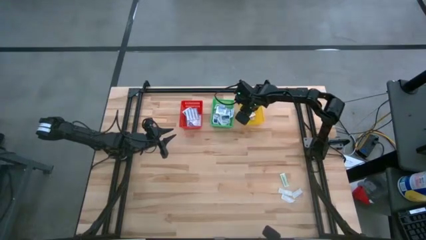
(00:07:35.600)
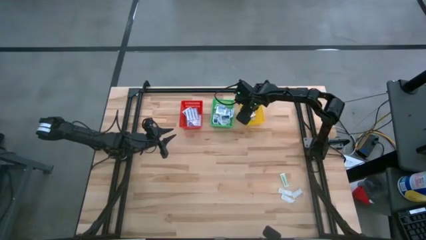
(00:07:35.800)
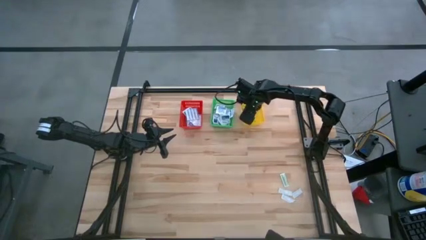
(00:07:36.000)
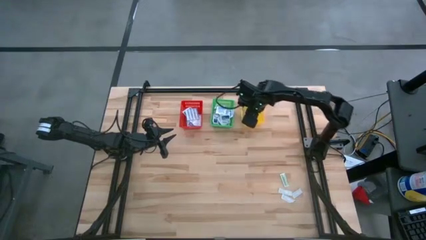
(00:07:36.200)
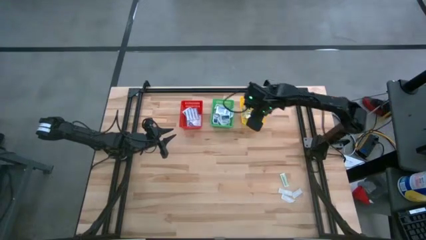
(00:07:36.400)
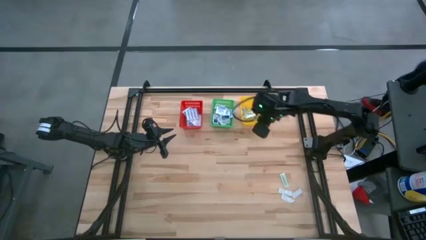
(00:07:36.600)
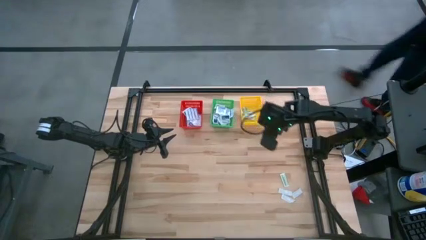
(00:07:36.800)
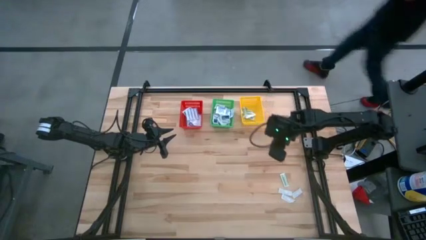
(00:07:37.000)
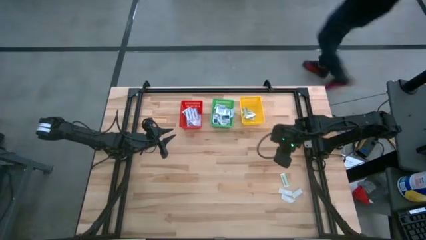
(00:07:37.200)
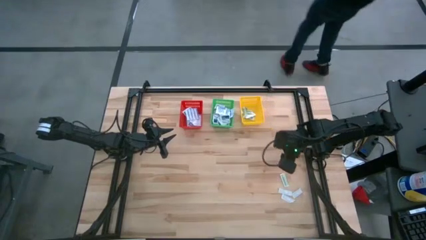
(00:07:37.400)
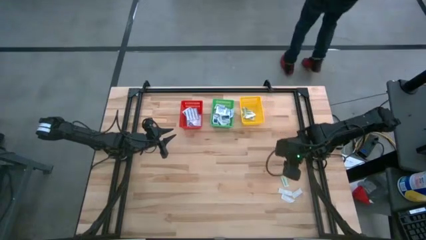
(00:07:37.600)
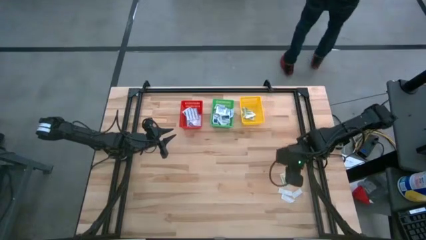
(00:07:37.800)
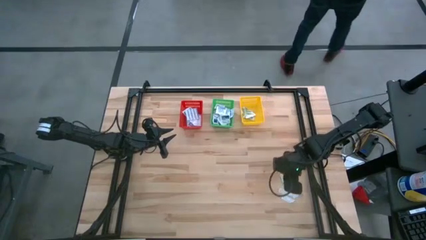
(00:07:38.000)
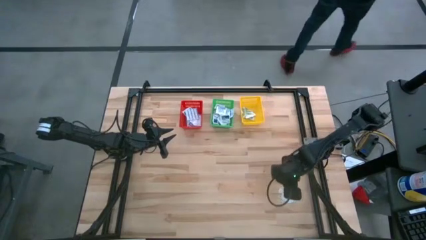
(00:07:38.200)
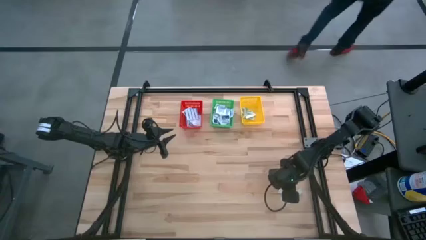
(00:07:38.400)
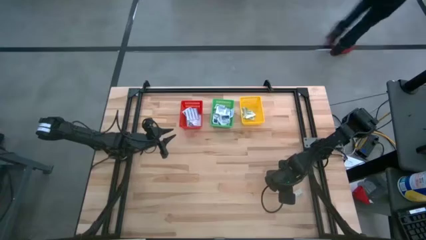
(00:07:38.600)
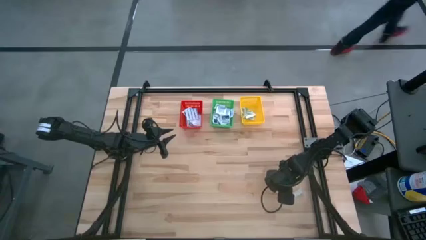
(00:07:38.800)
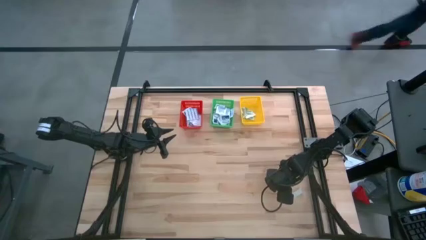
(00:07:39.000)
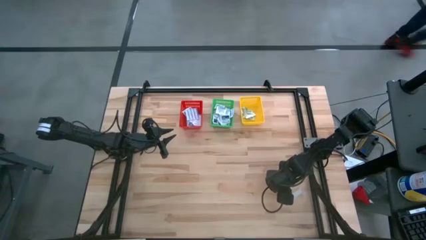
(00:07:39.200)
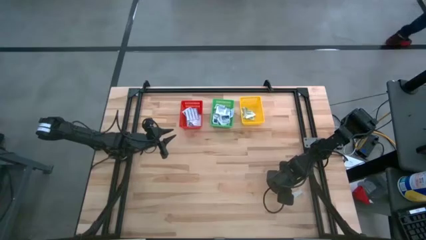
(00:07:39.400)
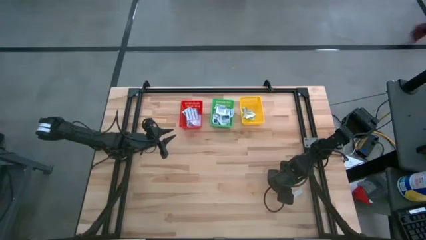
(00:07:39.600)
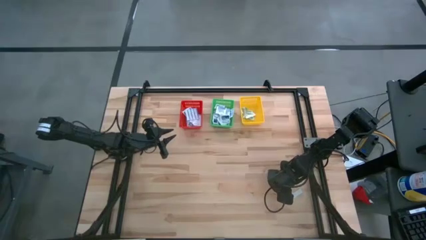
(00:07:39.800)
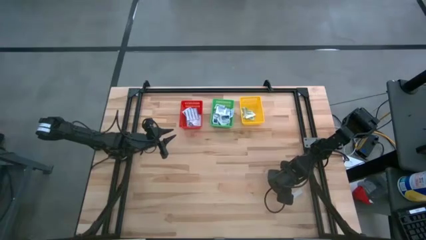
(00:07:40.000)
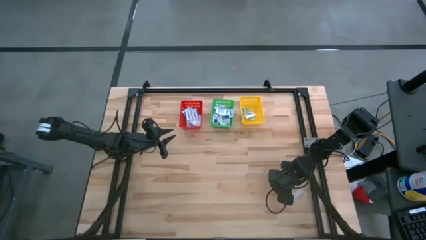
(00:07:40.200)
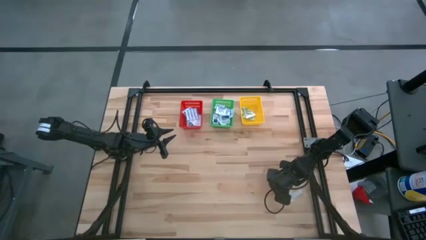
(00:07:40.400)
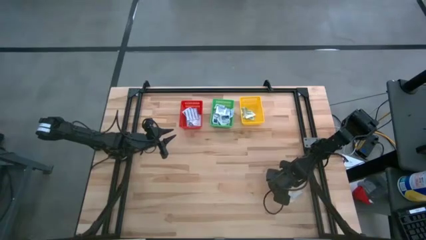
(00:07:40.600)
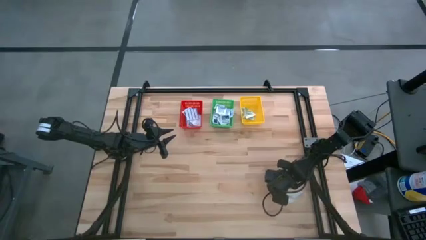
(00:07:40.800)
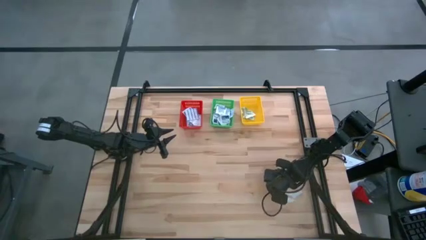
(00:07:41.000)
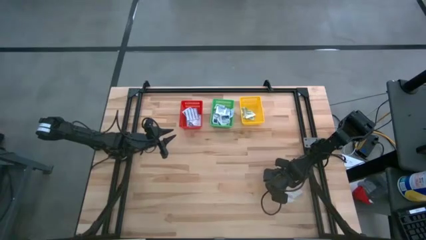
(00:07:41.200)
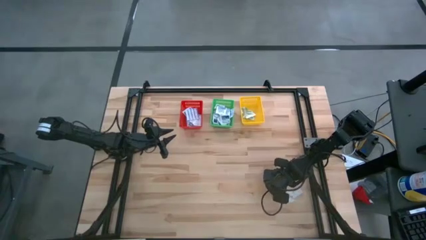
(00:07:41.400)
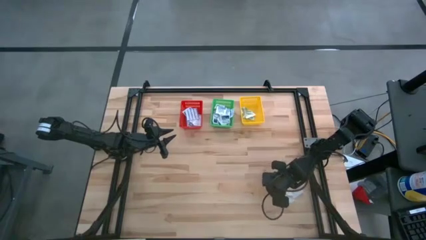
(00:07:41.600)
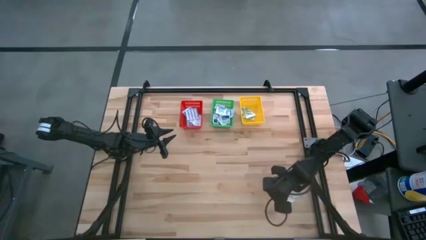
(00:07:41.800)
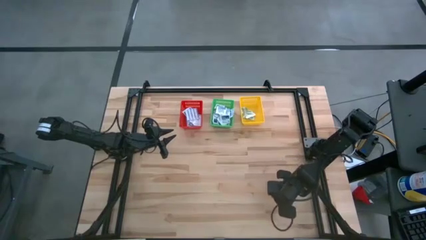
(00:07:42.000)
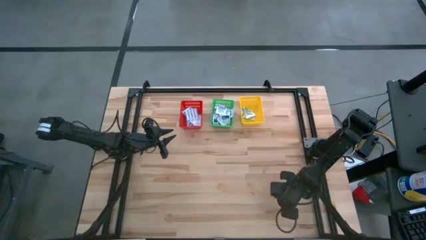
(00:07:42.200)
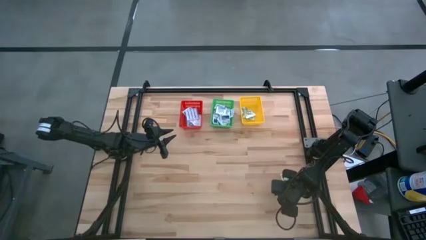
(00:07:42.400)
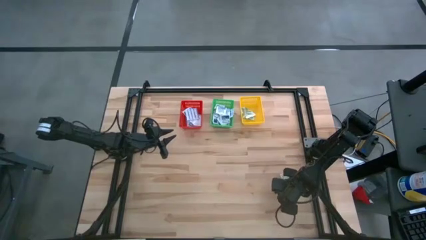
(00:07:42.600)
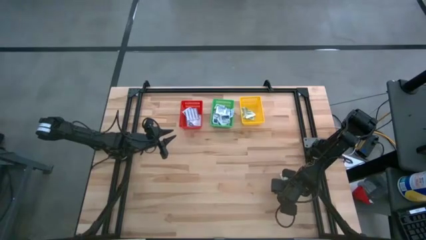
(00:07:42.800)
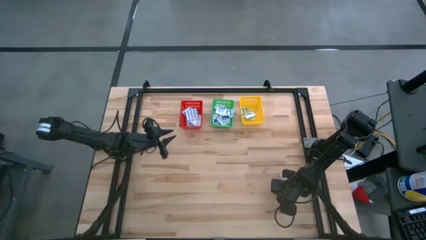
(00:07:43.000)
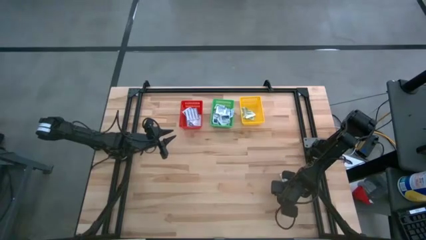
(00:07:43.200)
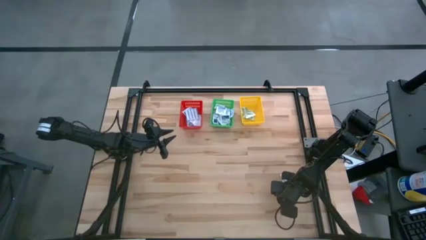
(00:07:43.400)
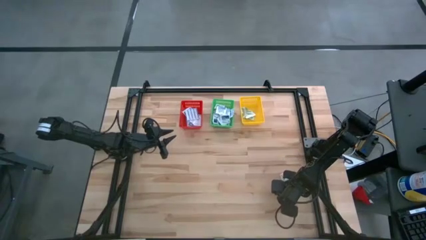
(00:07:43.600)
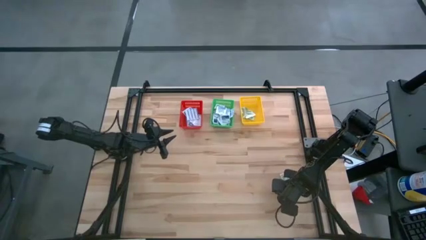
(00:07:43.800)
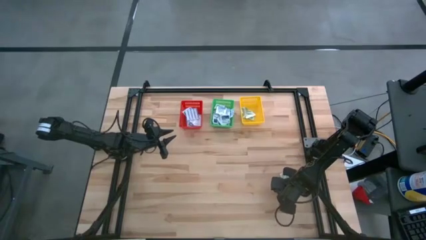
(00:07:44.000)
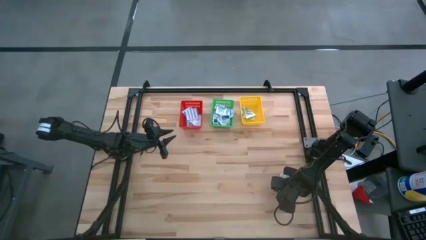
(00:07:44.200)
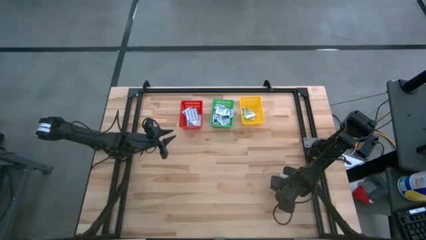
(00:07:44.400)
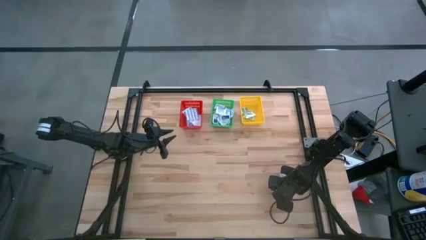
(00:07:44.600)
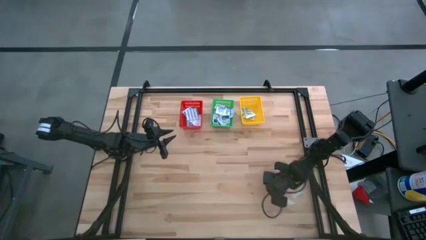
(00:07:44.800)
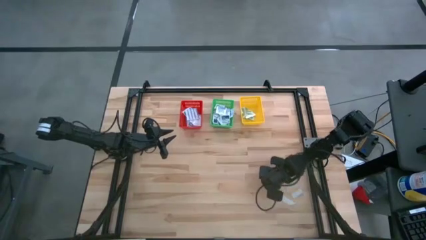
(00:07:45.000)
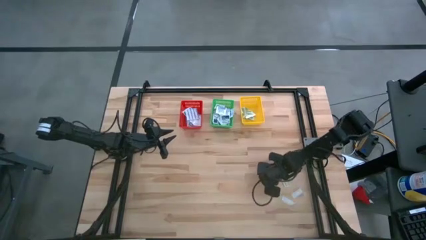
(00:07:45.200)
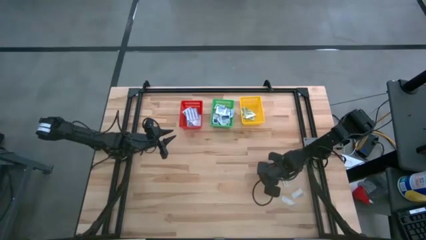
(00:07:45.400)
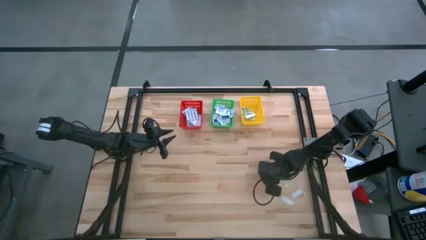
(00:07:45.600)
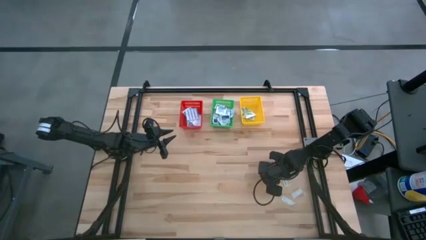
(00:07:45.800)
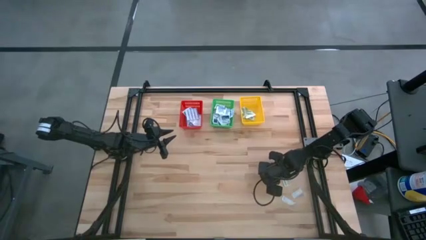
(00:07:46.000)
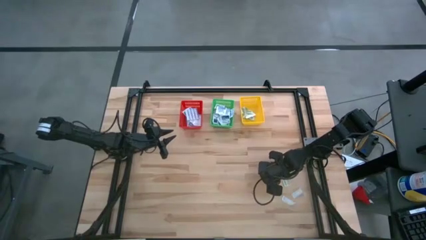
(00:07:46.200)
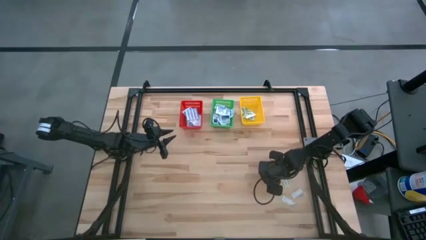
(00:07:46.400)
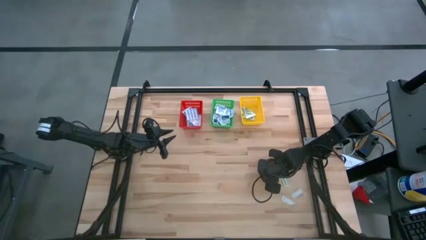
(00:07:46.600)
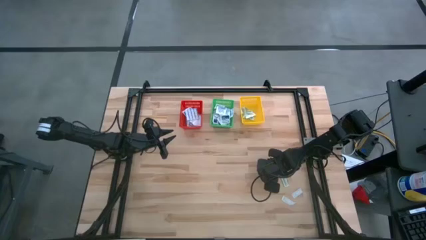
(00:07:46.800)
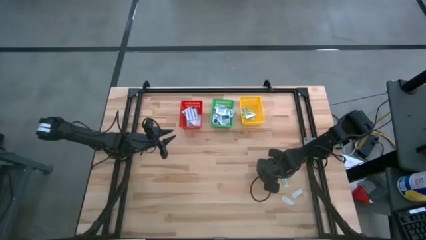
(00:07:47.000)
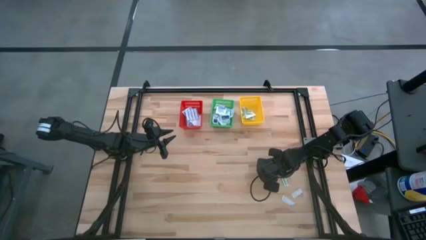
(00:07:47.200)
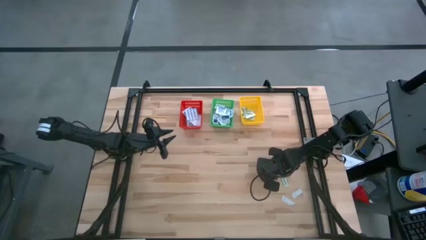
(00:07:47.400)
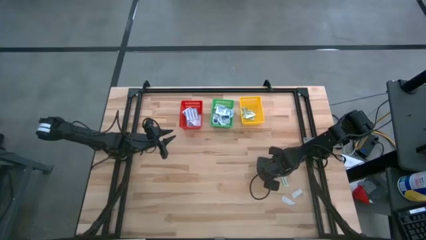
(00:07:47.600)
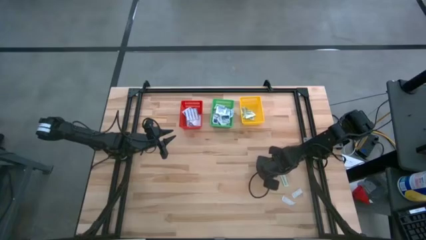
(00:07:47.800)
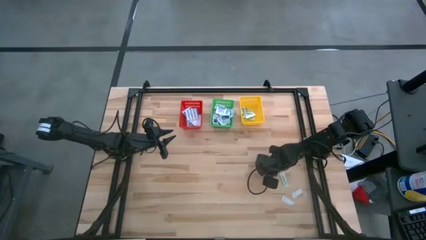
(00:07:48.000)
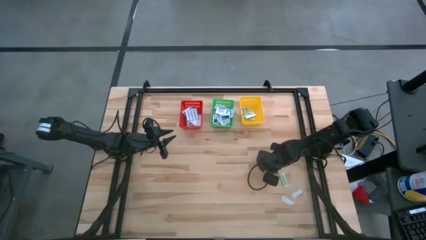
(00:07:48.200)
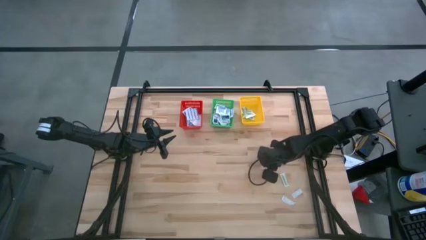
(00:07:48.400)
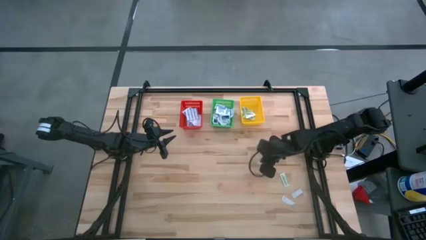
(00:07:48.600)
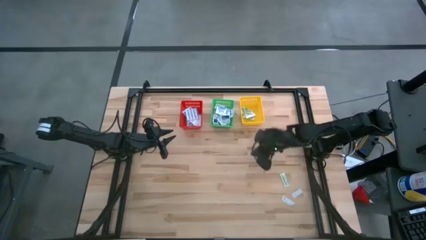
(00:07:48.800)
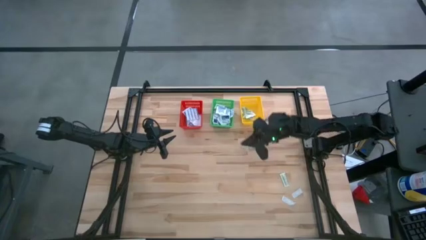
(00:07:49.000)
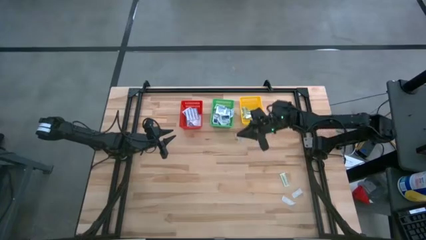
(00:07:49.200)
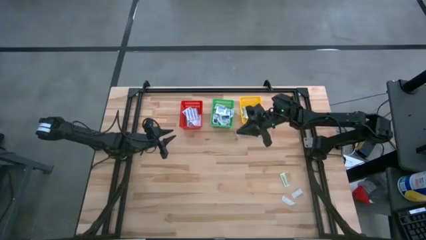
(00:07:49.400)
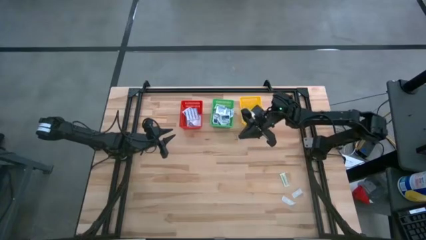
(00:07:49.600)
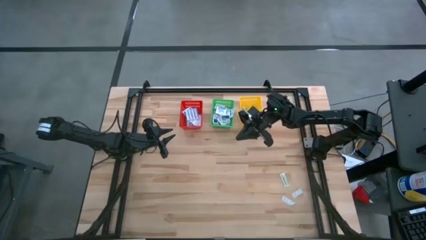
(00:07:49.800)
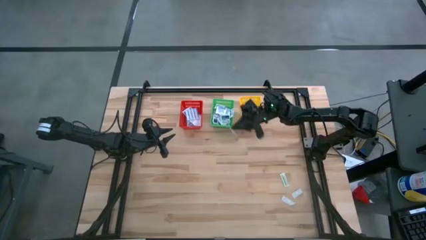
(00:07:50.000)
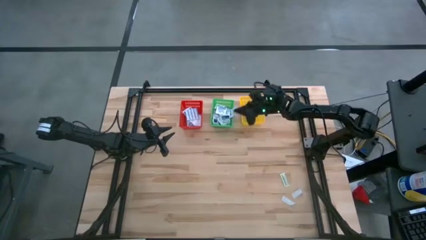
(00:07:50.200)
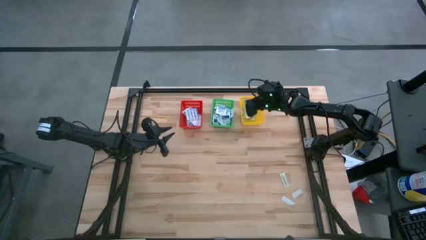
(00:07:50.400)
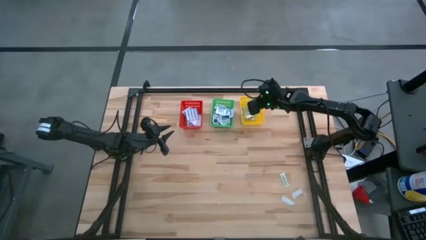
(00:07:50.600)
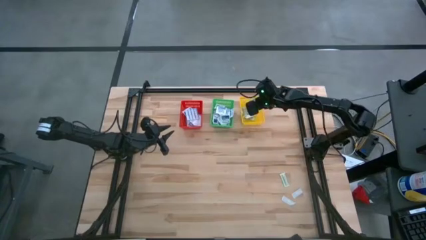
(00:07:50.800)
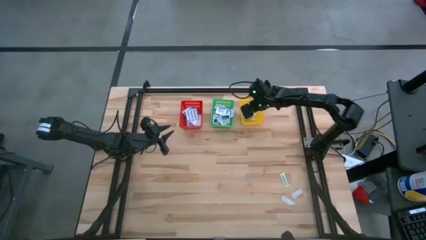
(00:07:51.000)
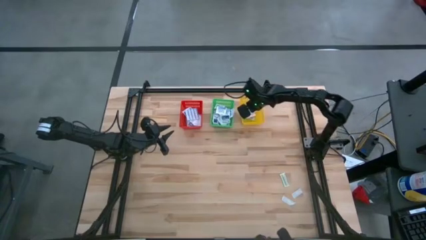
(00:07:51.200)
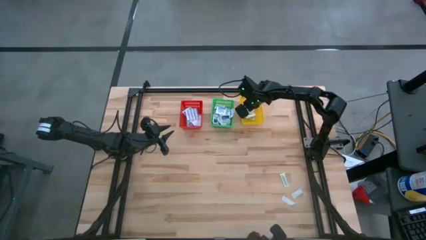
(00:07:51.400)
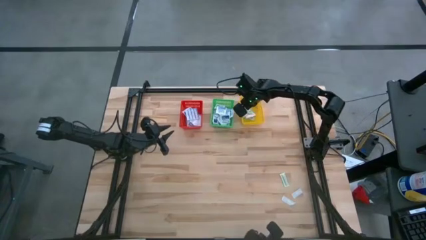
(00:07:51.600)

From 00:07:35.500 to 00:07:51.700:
Task: Pick & Place First Aid Supplies
Put the green bandage into the yellow basket
